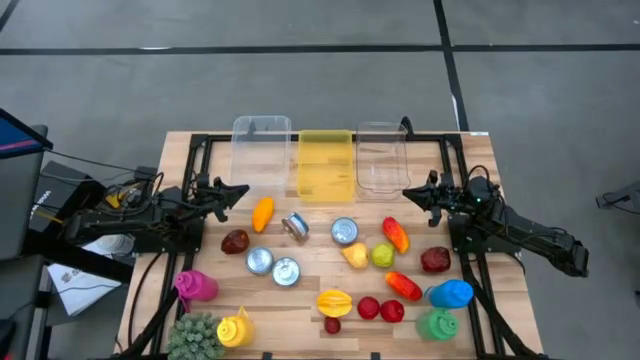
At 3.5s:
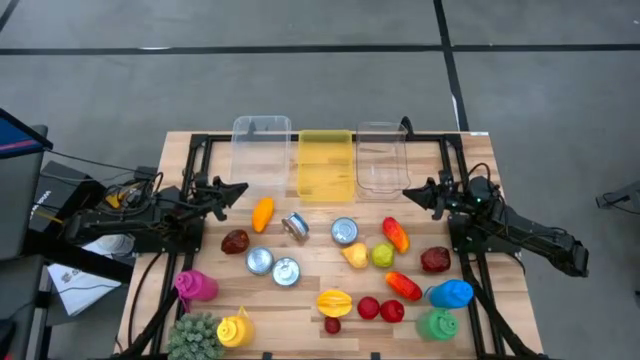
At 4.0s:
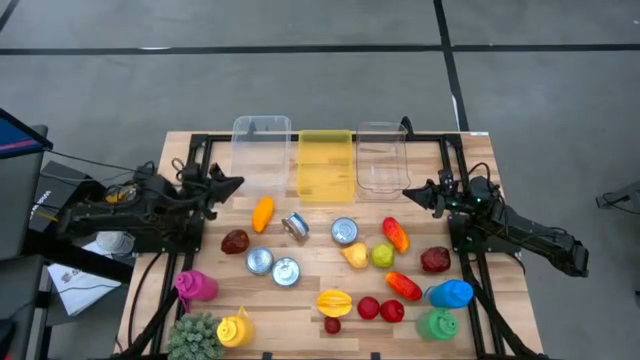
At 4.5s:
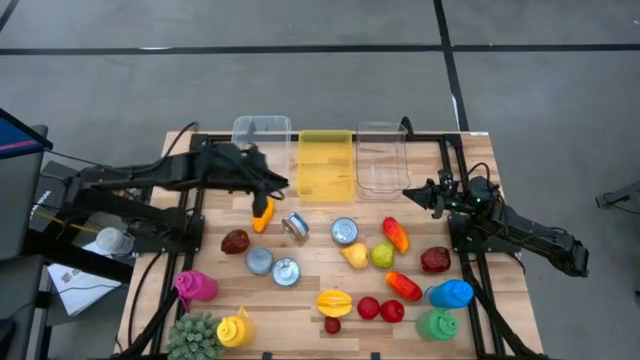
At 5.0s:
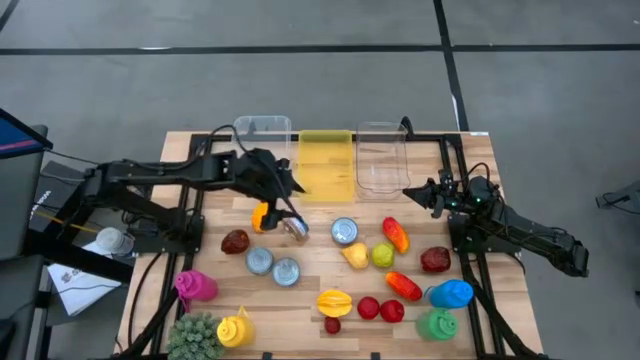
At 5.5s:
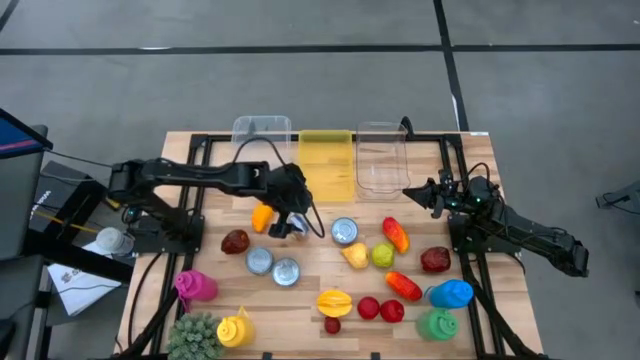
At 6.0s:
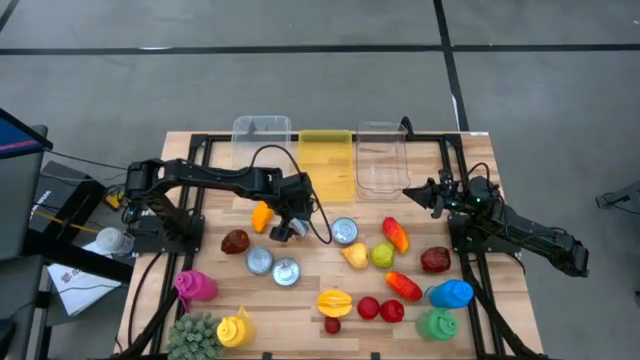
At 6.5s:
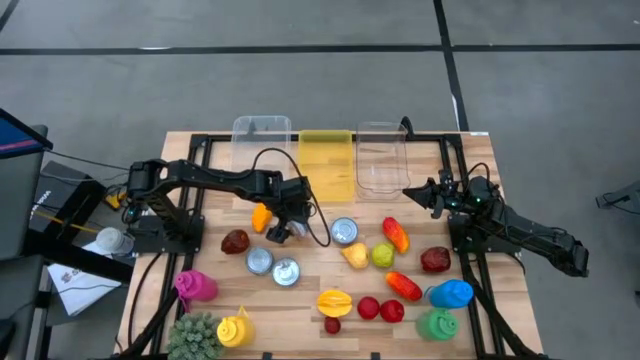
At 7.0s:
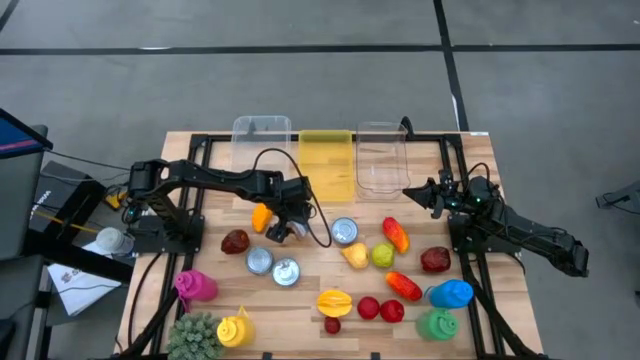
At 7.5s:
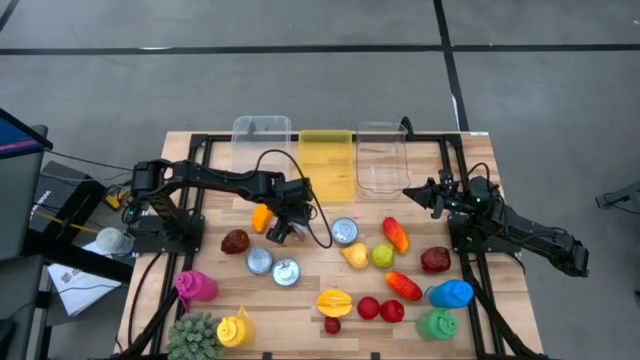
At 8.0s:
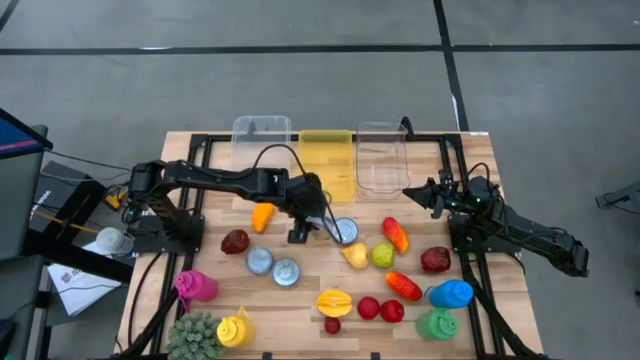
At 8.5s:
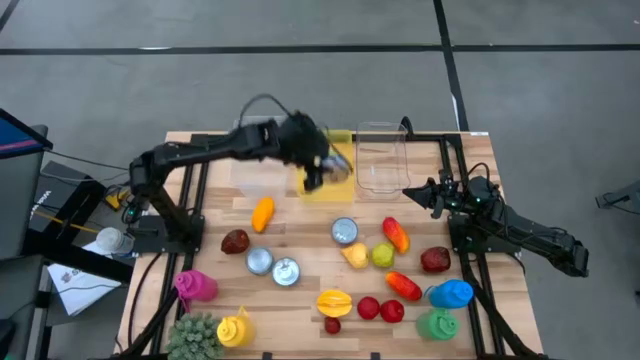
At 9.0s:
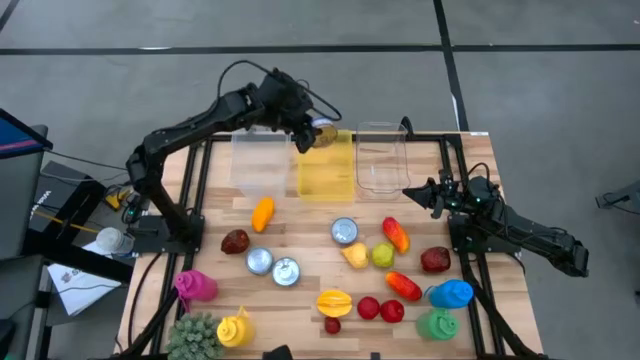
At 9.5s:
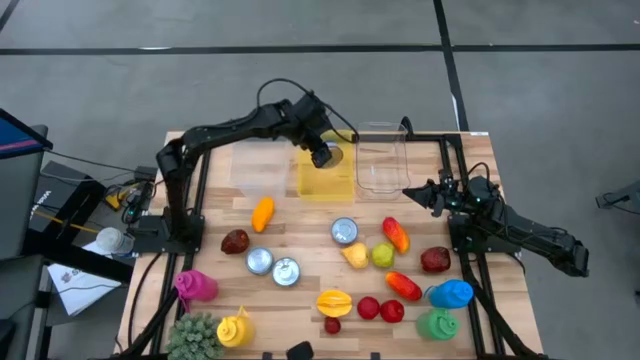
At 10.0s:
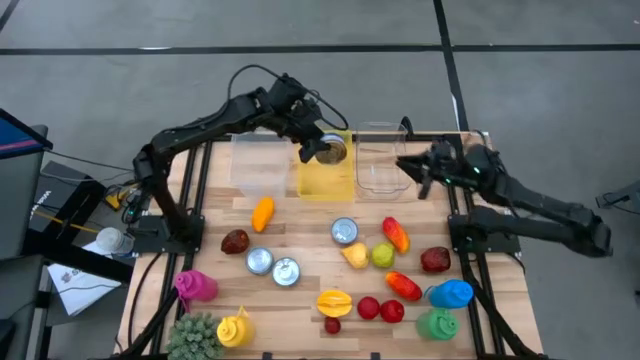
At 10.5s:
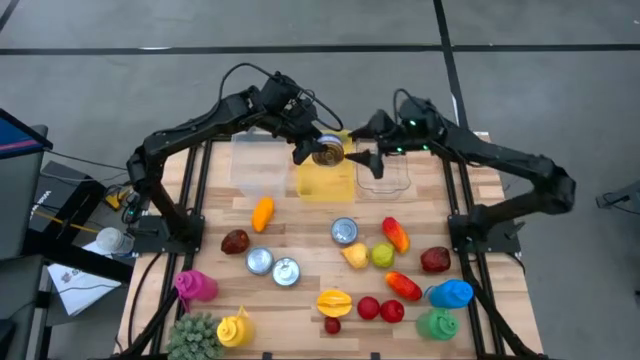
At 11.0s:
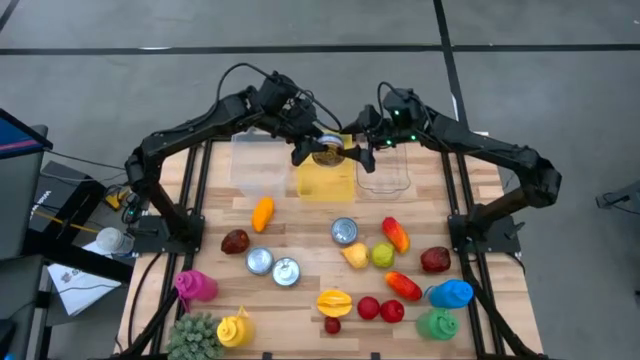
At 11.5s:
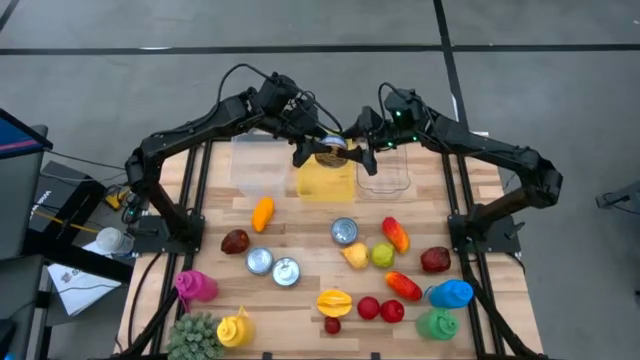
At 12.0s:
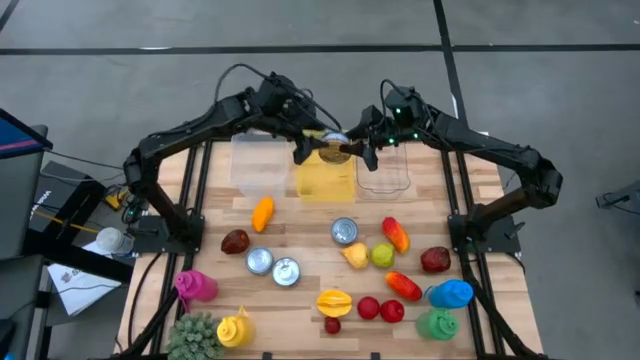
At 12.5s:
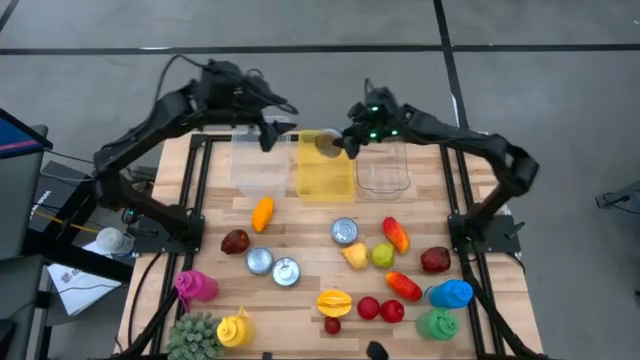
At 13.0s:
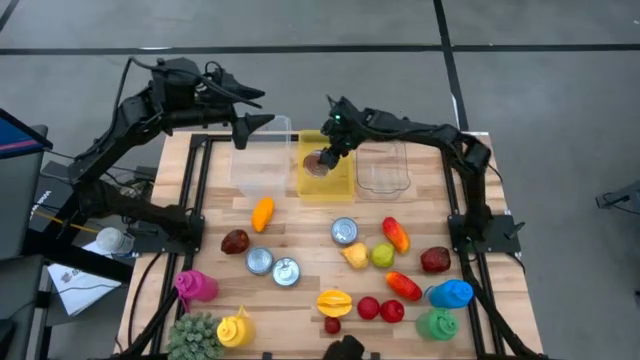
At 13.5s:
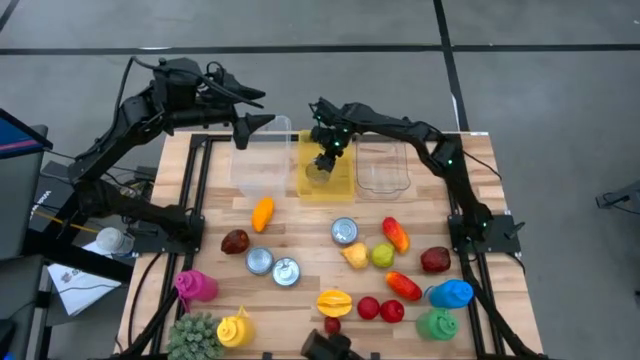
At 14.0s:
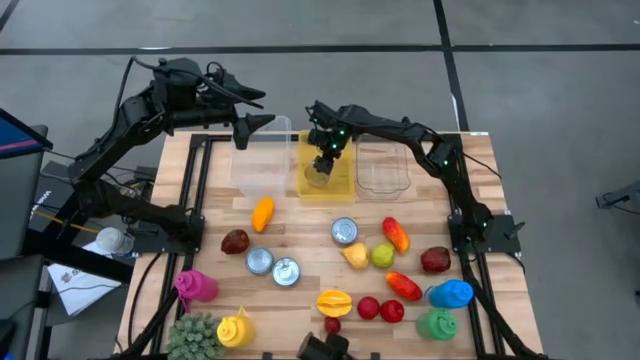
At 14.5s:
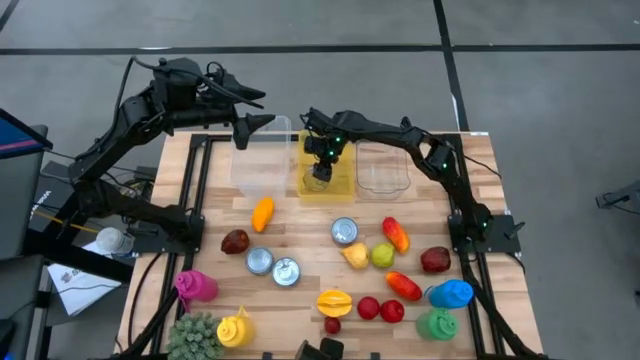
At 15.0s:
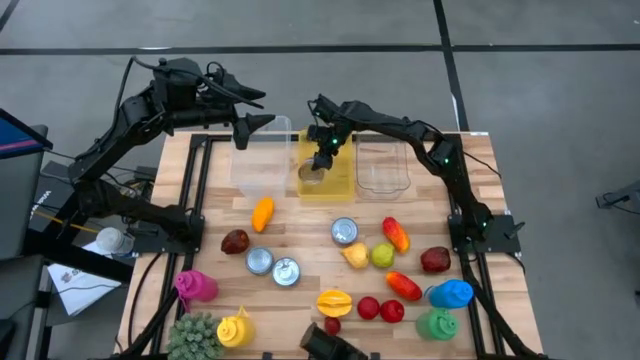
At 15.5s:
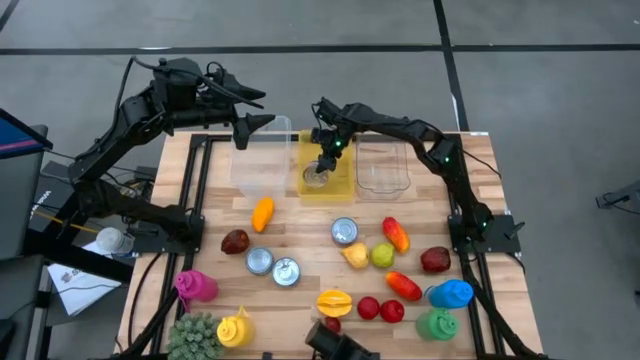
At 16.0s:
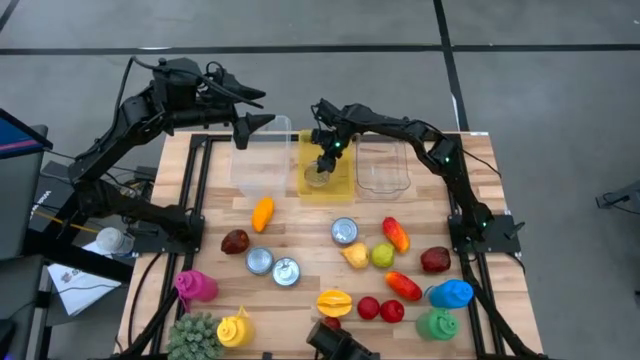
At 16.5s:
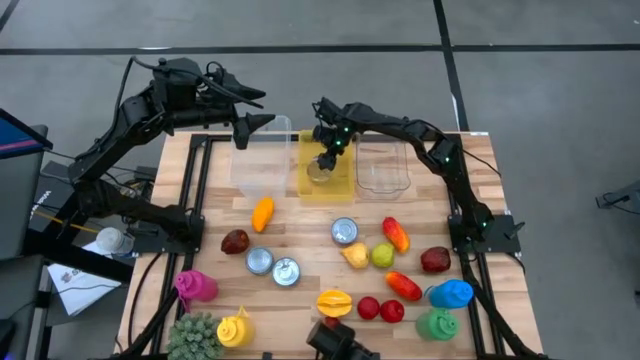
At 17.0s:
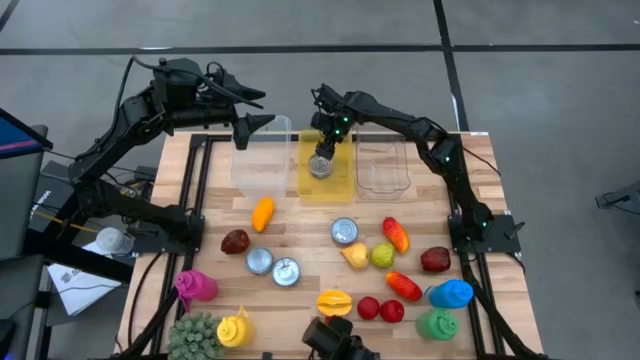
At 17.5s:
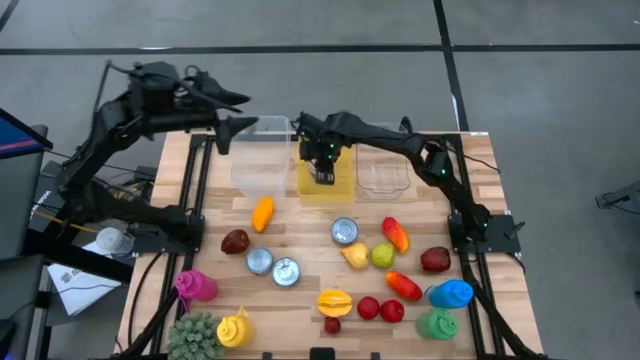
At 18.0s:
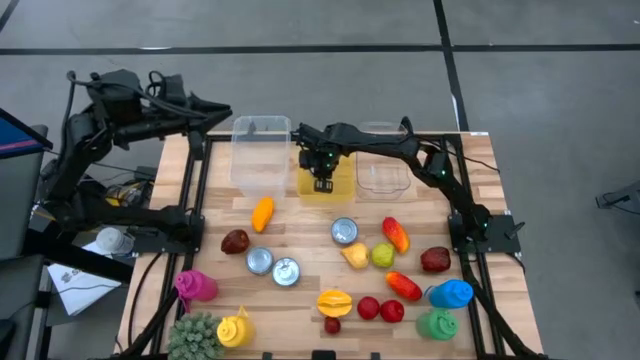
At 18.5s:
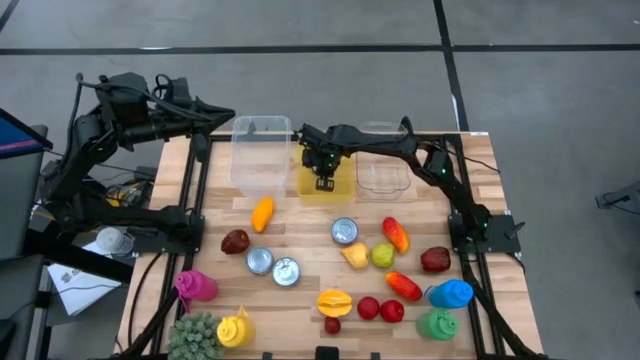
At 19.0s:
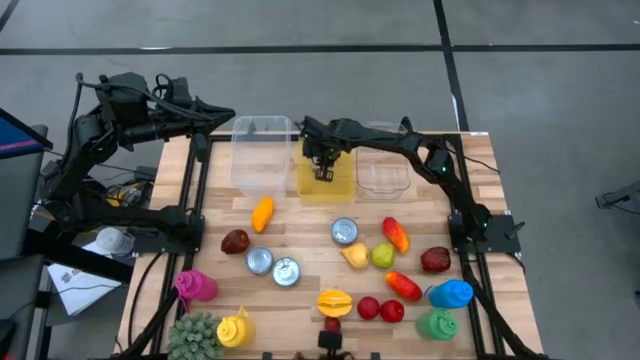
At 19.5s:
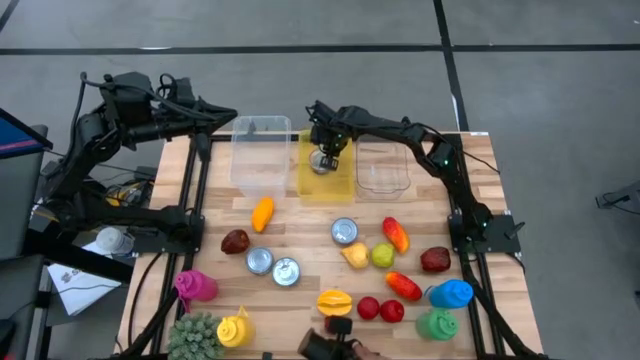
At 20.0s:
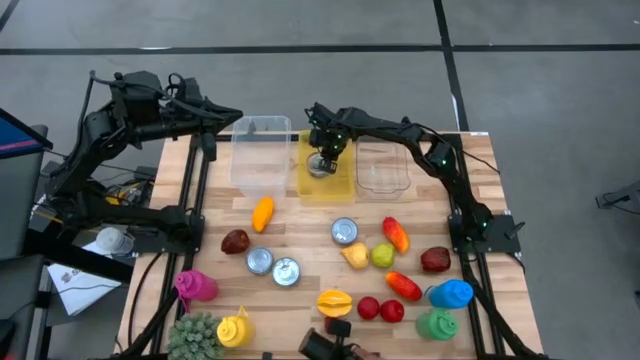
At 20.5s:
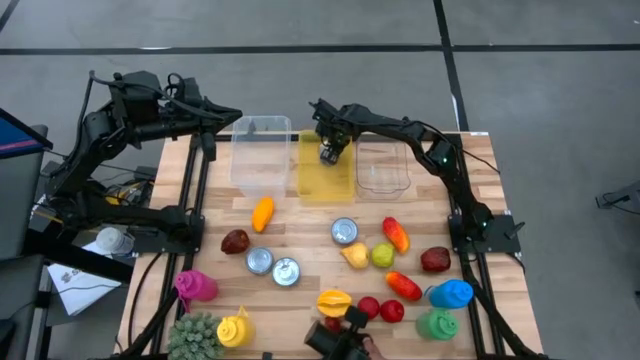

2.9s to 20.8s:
Task: Pick & Place Food Item
Put the blue and pink tuna can into the yellow bin

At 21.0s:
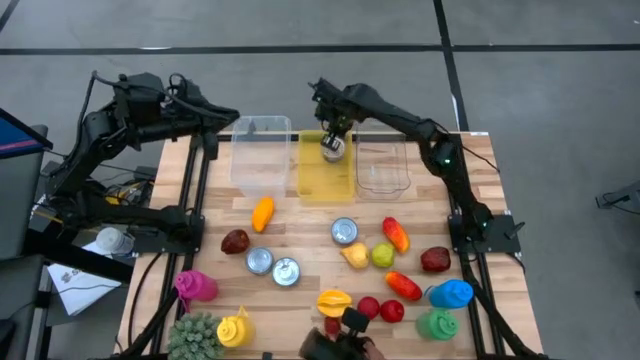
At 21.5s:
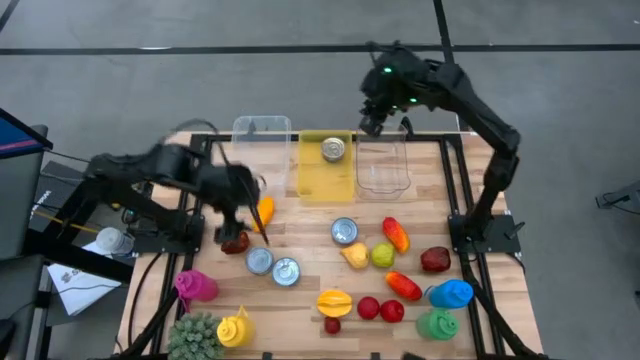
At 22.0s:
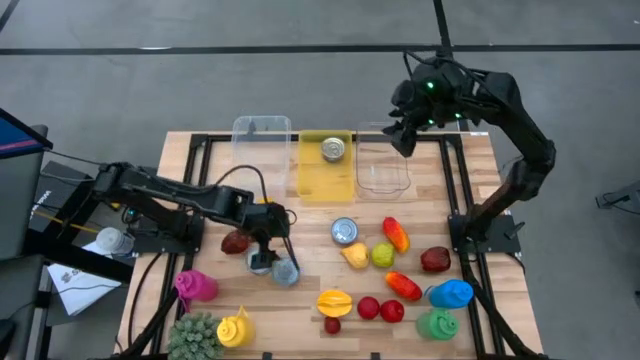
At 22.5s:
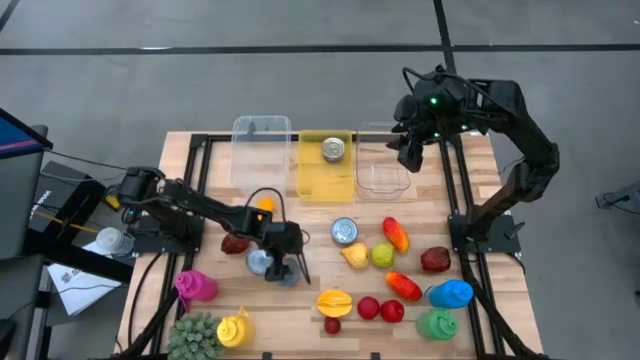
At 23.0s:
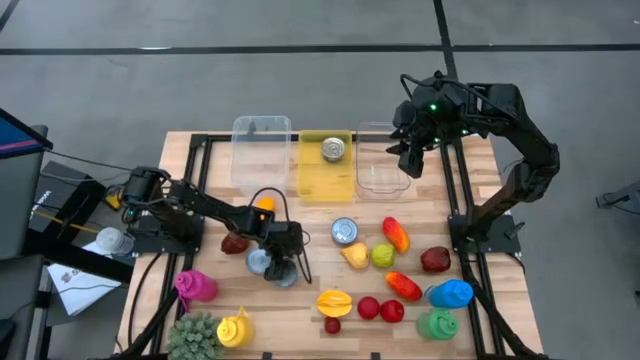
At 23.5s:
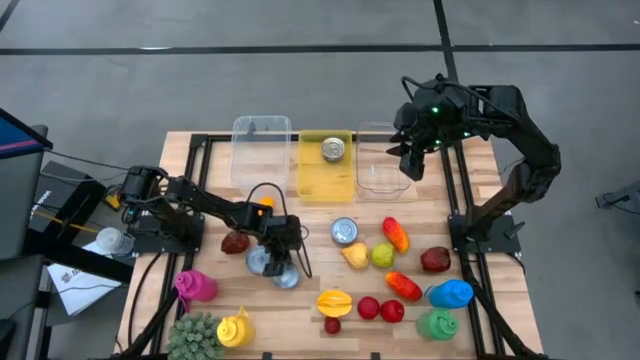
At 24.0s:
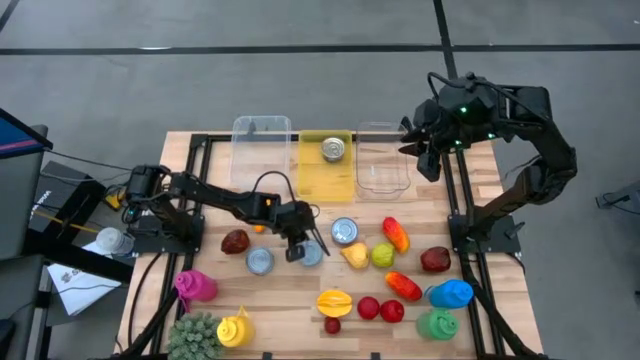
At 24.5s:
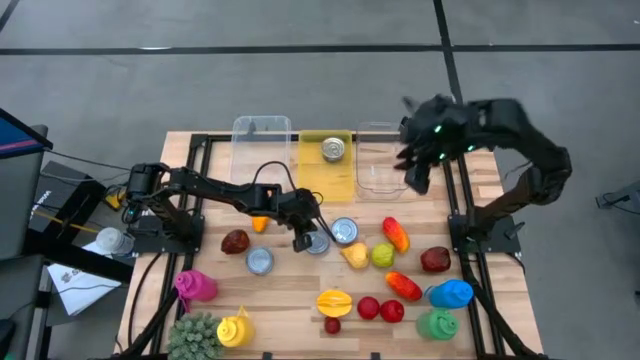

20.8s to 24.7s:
Put the blue tuna can into the yellow bin
